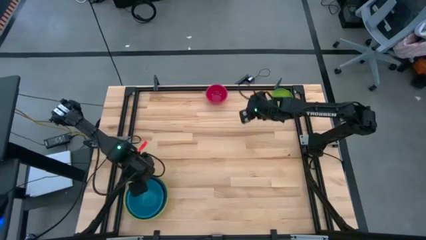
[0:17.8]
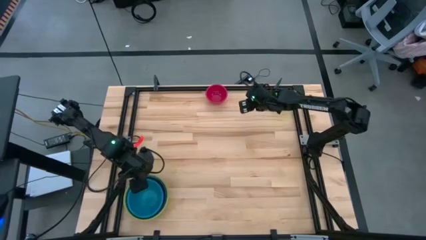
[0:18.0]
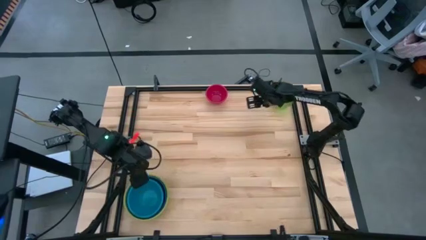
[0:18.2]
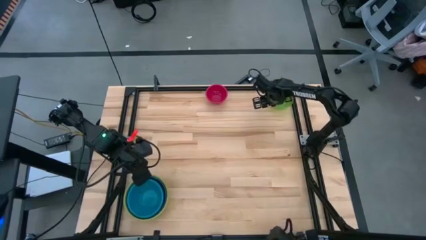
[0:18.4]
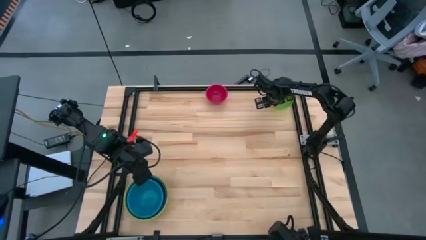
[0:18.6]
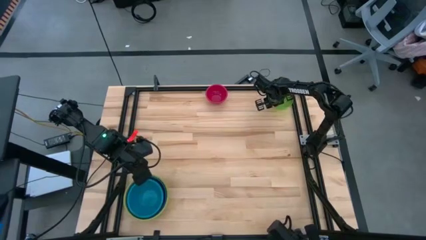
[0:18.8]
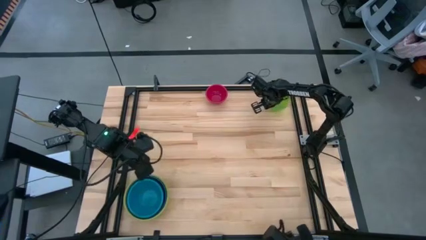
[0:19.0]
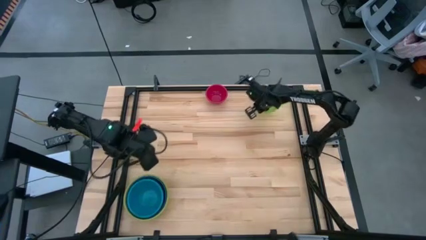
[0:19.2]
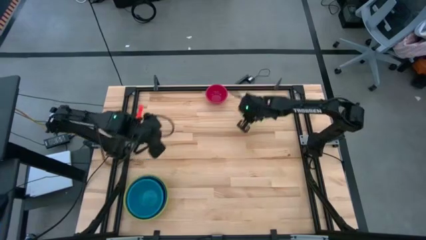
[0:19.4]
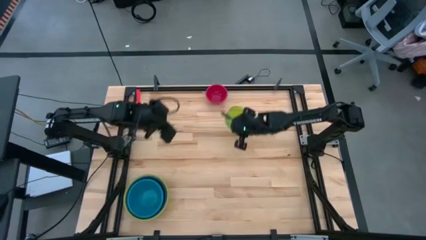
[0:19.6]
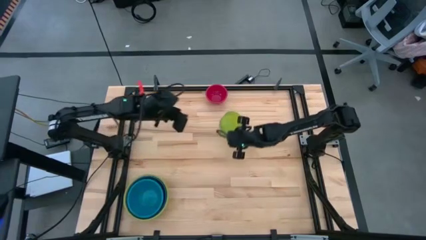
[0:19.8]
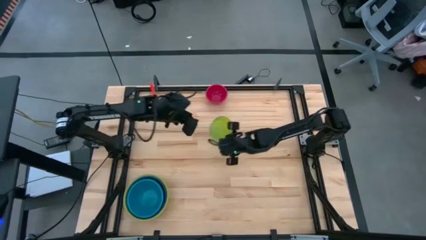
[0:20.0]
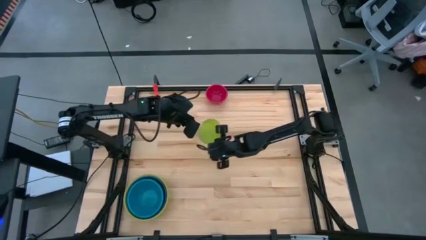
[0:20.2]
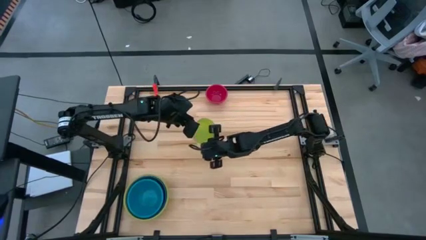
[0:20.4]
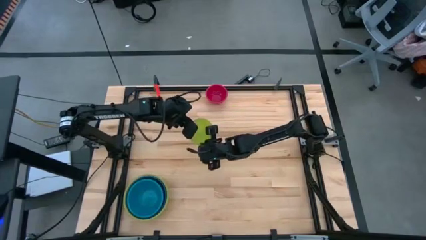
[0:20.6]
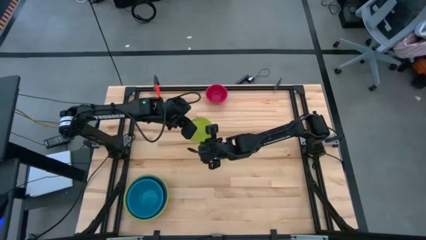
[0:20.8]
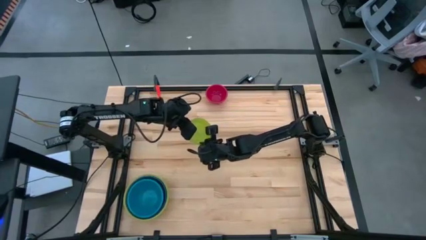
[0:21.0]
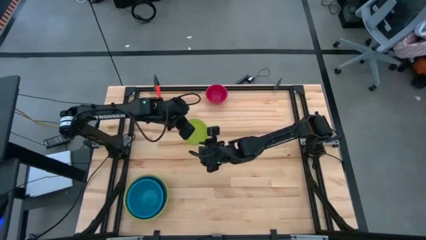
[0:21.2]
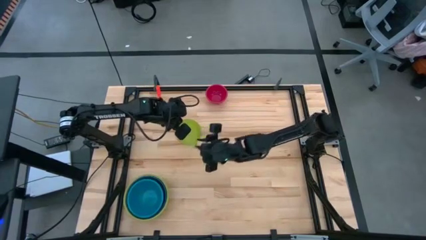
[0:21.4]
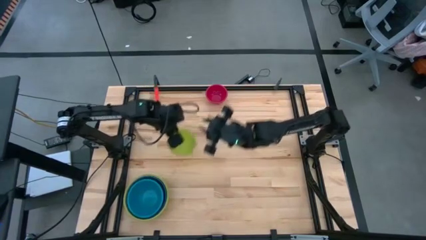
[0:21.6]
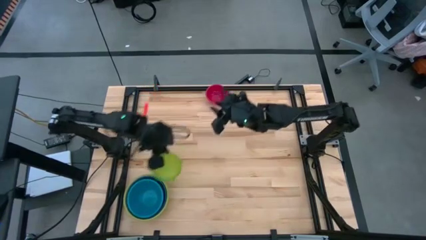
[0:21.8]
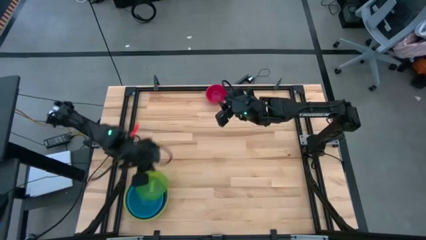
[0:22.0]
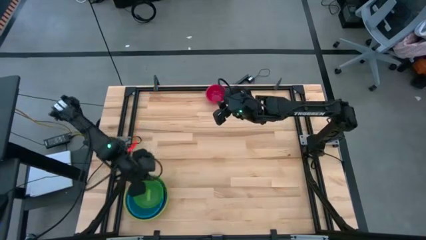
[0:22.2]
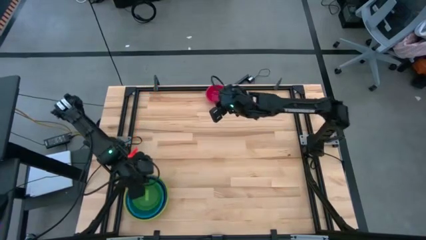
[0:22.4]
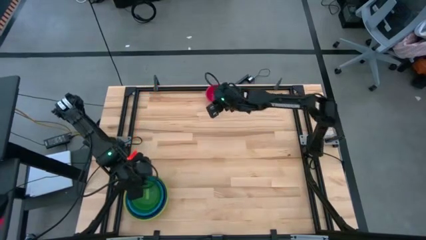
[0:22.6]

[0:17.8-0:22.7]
Stack the green bowl on top of the blue bowl

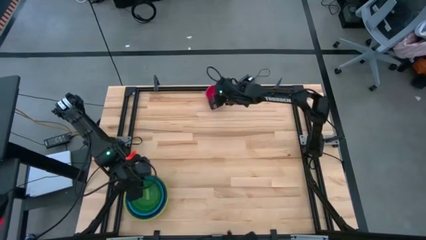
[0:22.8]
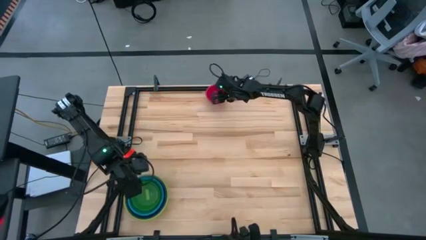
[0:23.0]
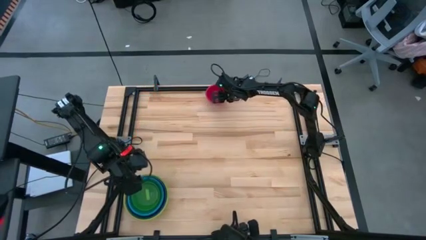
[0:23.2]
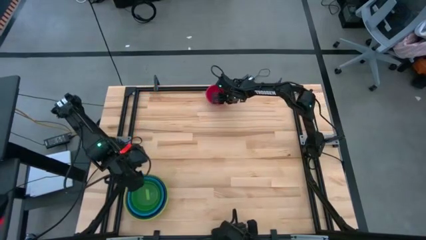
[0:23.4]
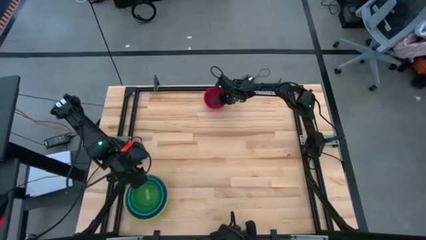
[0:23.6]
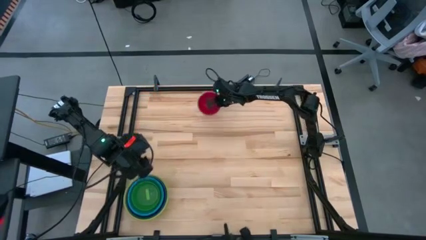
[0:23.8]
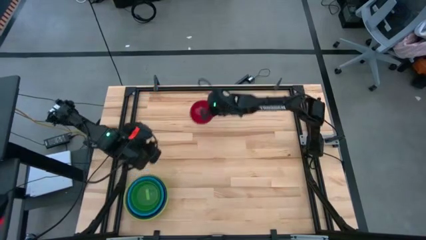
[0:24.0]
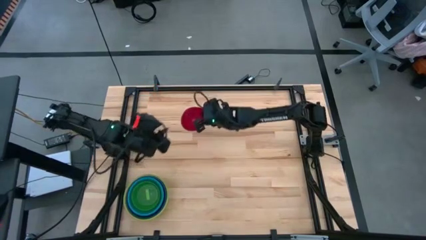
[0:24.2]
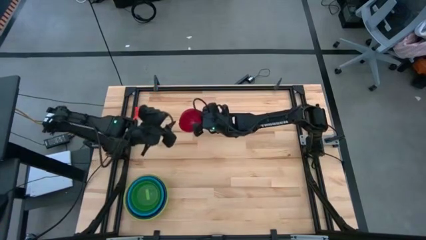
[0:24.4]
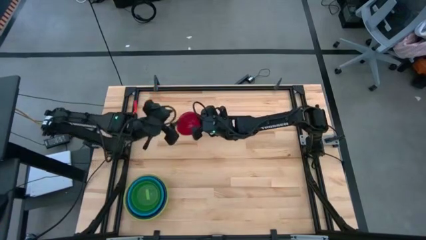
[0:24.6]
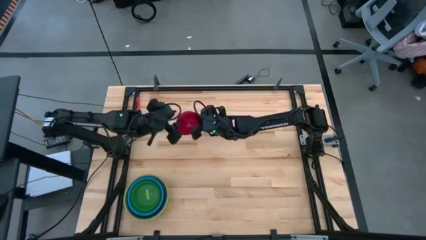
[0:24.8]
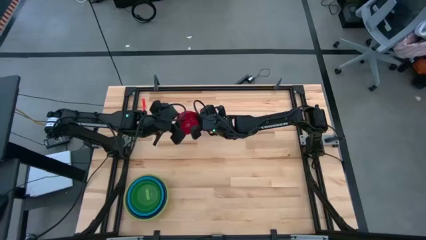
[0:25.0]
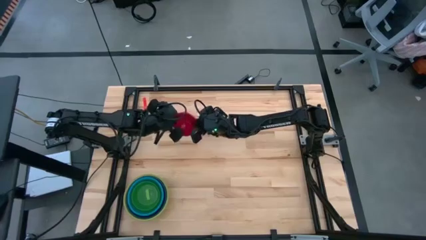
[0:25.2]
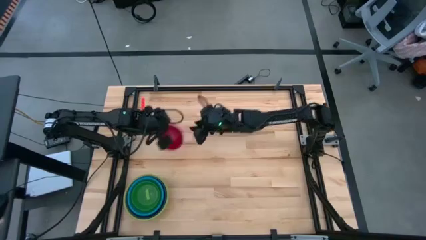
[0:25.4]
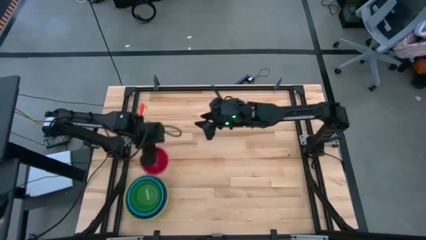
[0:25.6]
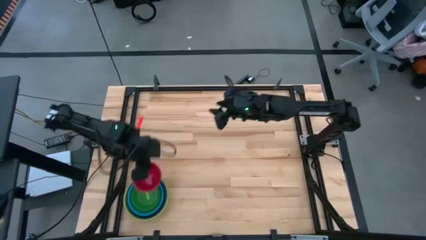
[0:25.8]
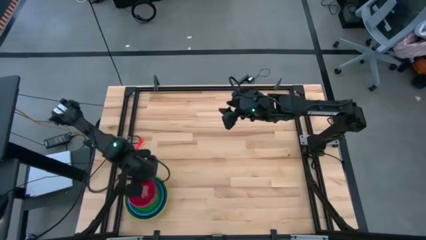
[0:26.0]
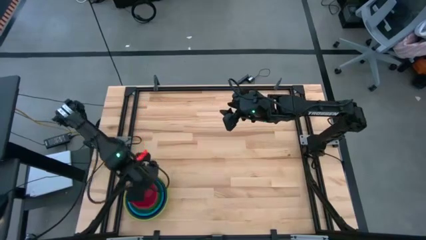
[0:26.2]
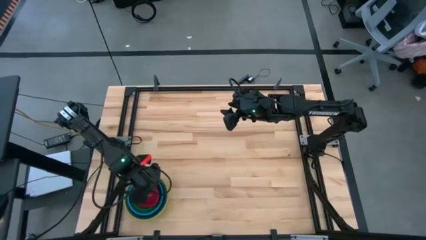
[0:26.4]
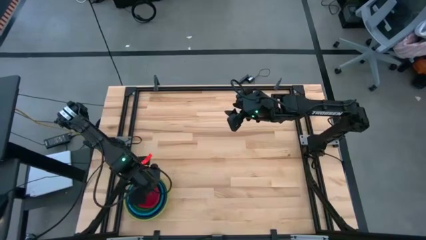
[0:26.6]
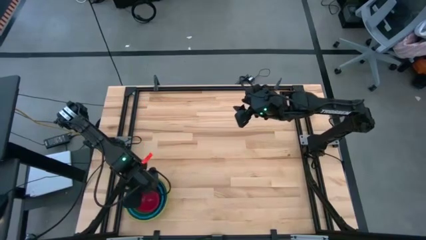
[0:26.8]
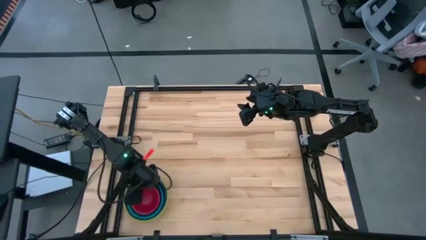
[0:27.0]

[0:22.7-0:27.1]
Stack the red bowl on top of the green bowl

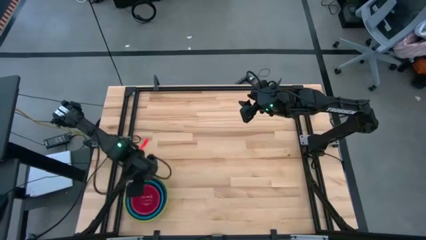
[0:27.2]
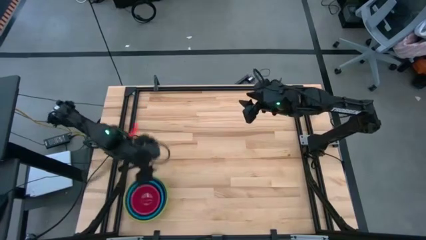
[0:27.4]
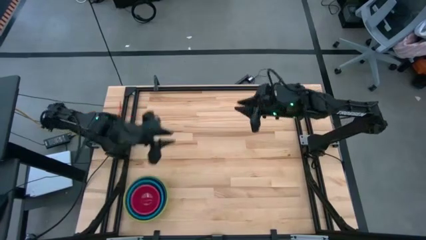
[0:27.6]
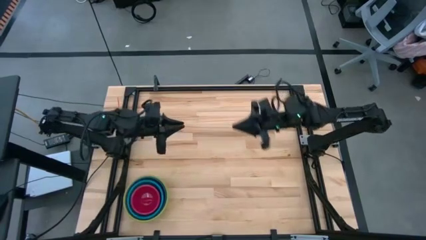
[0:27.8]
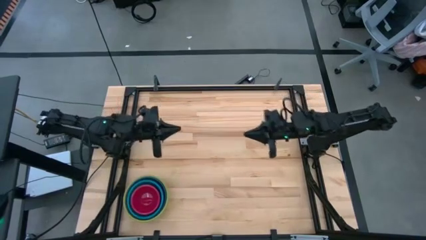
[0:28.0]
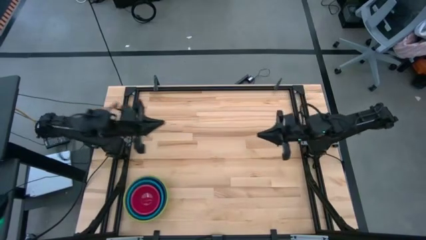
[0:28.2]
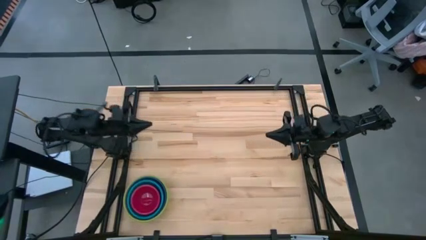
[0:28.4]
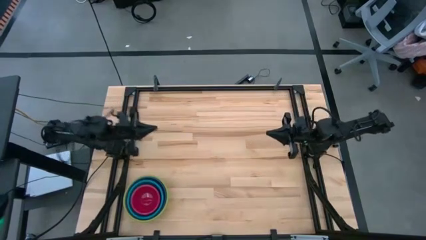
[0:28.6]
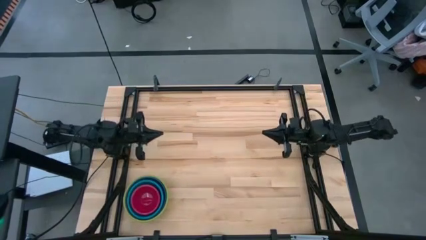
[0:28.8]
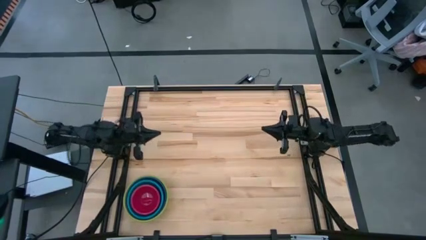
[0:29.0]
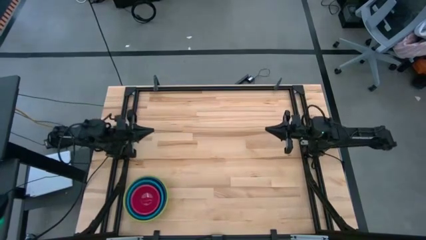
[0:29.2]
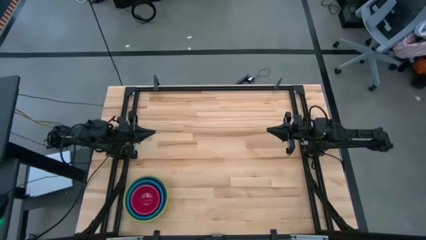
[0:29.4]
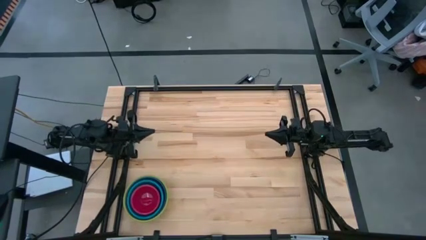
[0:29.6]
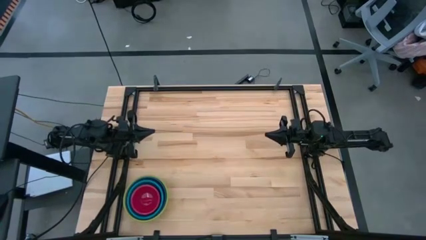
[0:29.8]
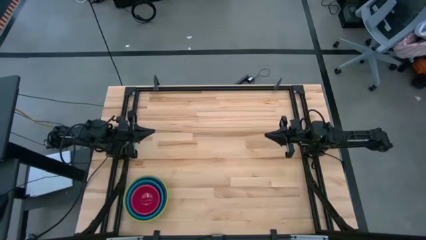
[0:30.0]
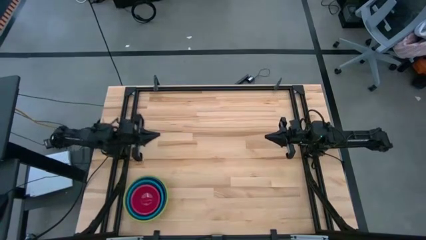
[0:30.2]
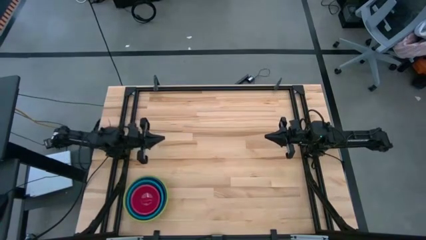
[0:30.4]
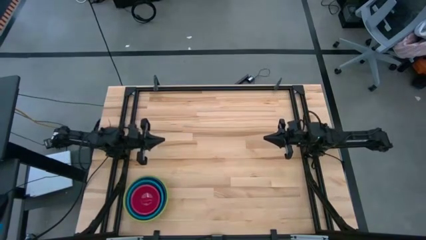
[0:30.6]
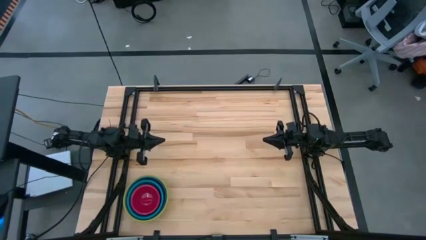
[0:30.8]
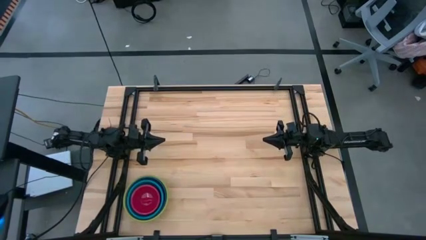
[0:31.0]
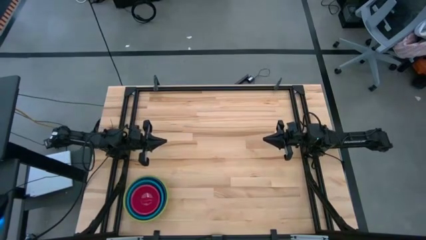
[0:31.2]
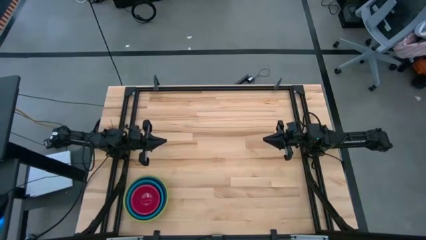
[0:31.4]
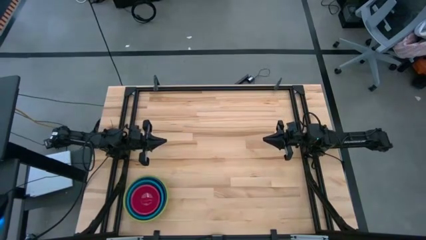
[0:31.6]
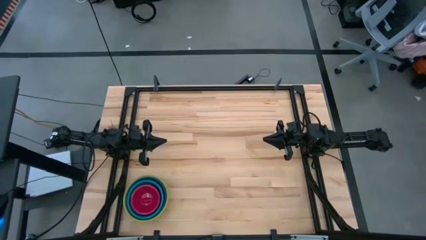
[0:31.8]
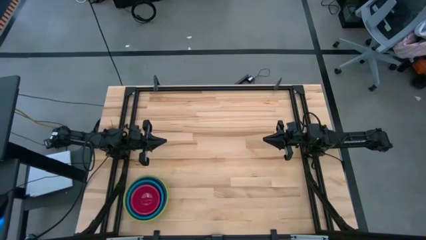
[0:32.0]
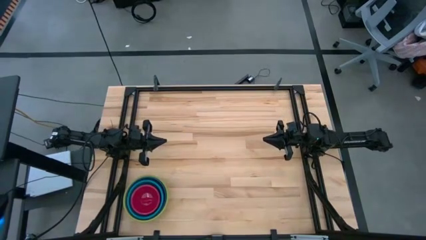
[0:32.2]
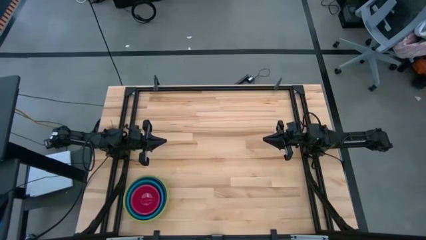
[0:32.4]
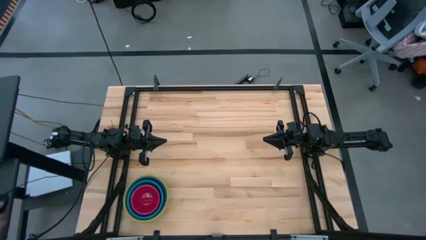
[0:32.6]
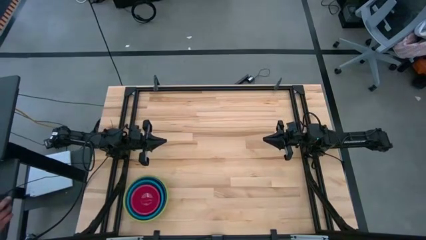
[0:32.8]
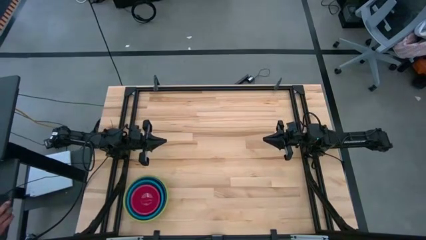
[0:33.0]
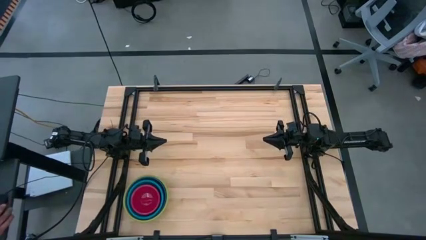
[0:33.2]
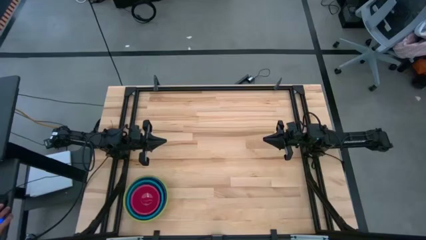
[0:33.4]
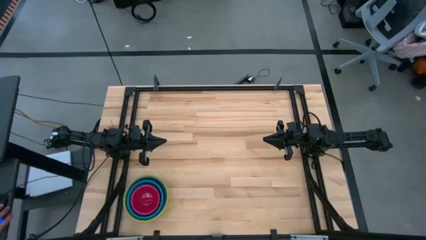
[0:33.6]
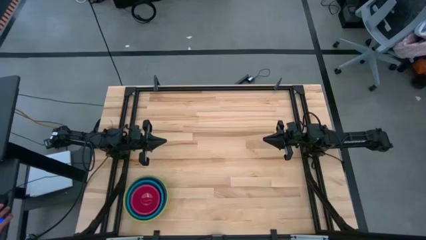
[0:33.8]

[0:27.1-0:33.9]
Return to Home Position
